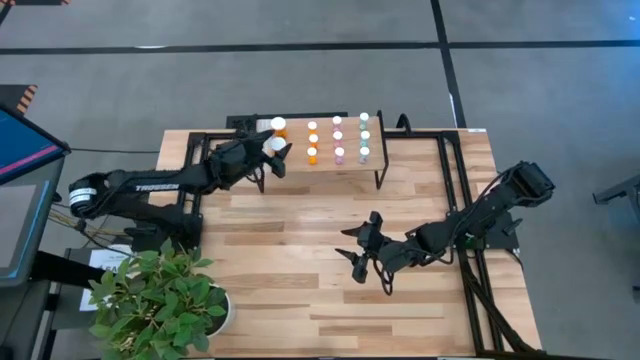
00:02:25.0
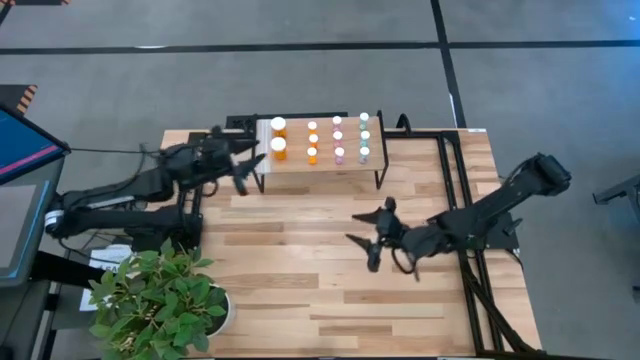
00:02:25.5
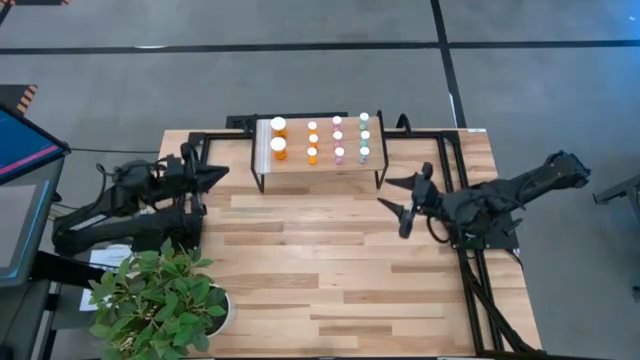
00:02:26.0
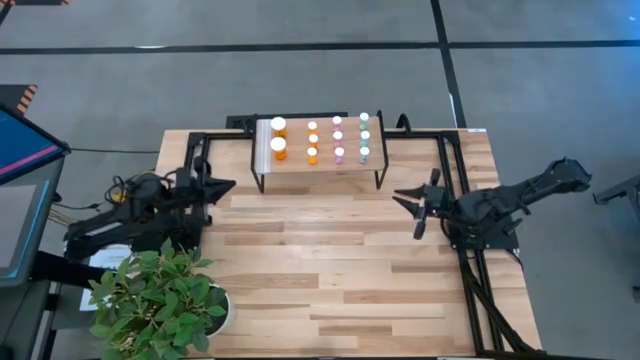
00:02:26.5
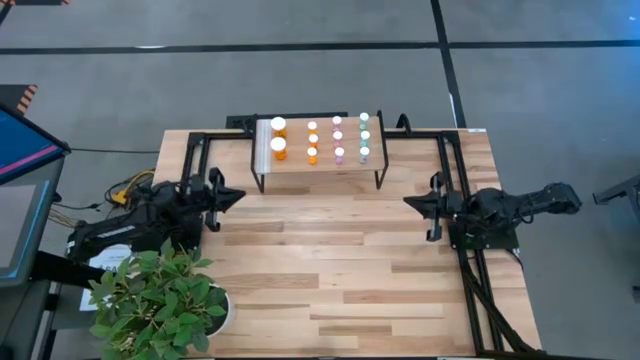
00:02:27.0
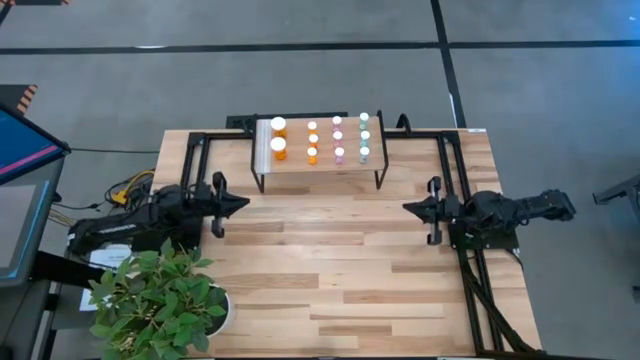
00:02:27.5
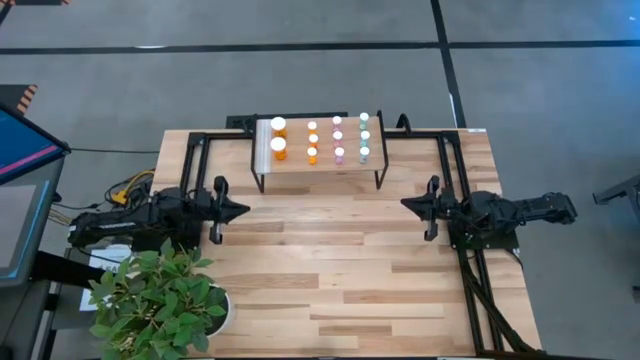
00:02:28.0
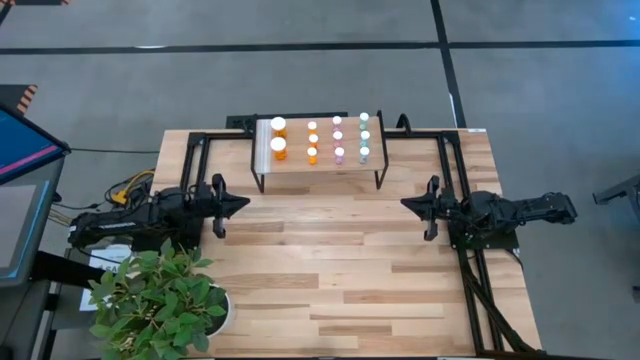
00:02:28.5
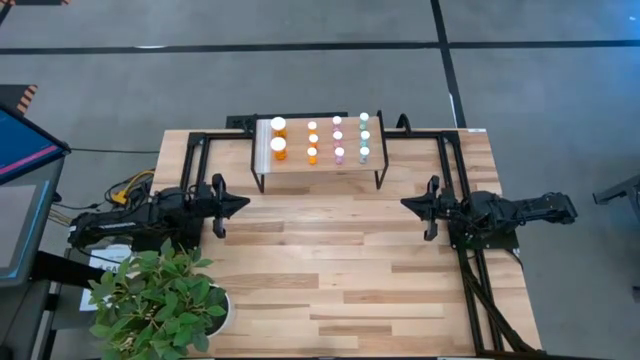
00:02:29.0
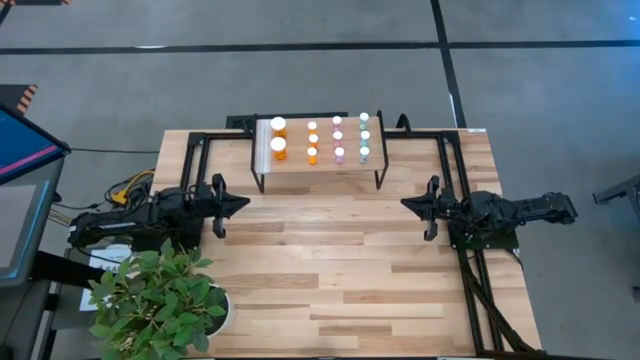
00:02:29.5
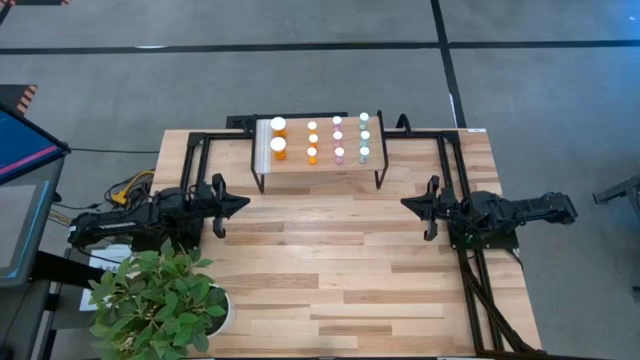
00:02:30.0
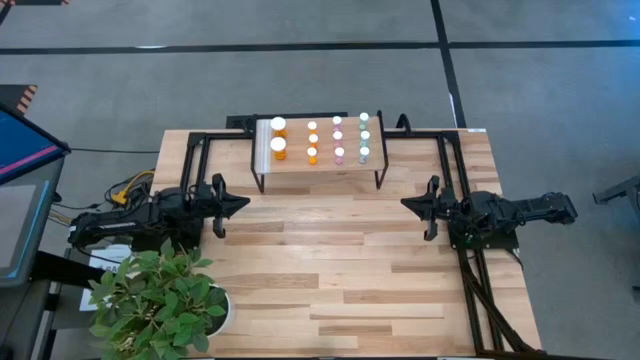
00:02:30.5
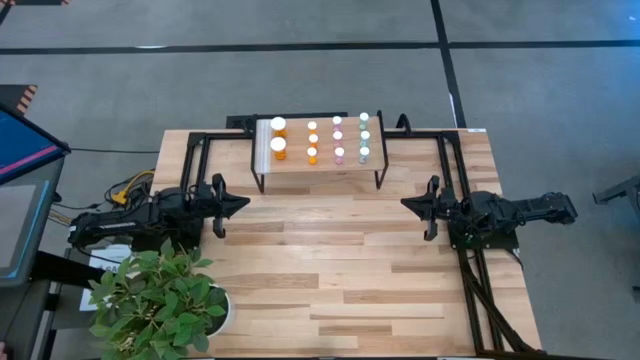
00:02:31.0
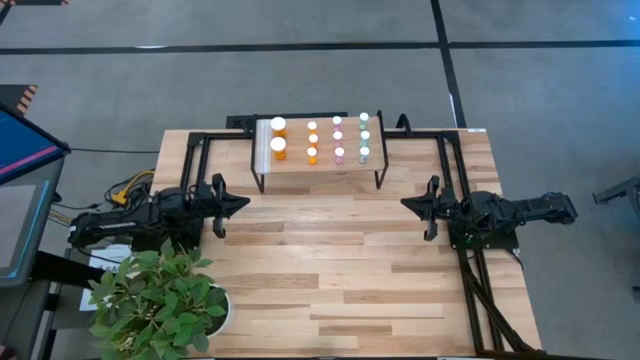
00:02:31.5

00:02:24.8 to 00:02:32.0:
Task: Pick and place medicine bottles onto shelf by color
Return to Home Position

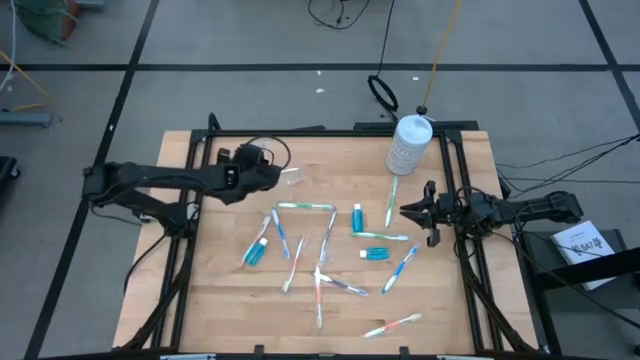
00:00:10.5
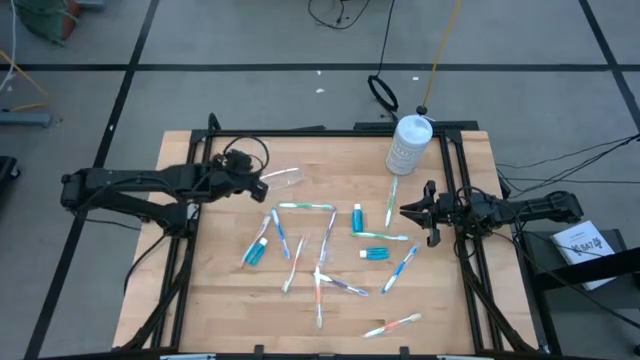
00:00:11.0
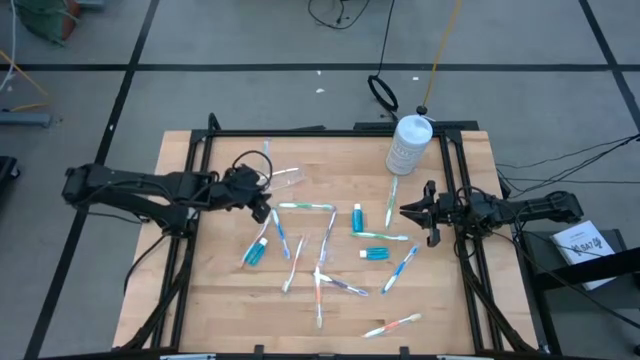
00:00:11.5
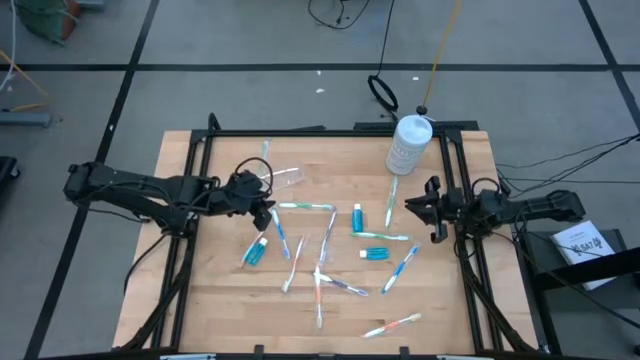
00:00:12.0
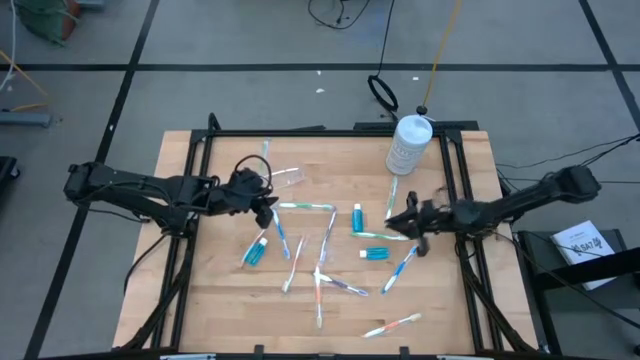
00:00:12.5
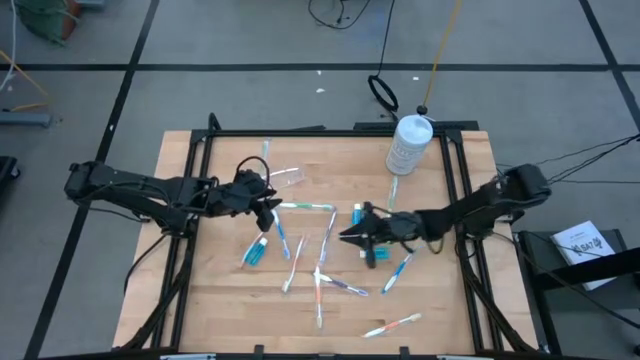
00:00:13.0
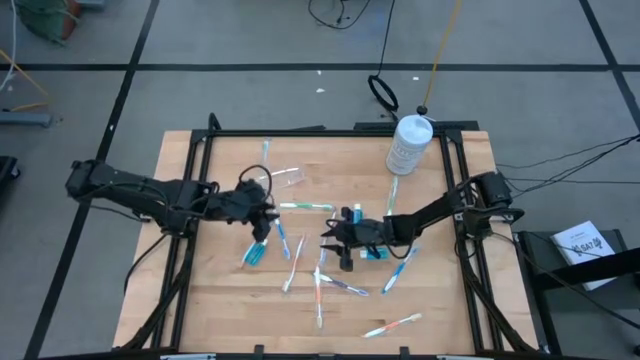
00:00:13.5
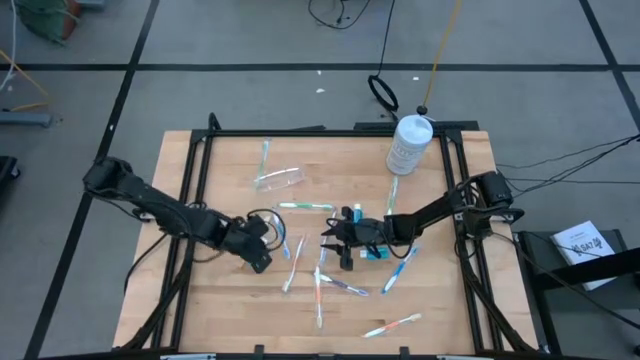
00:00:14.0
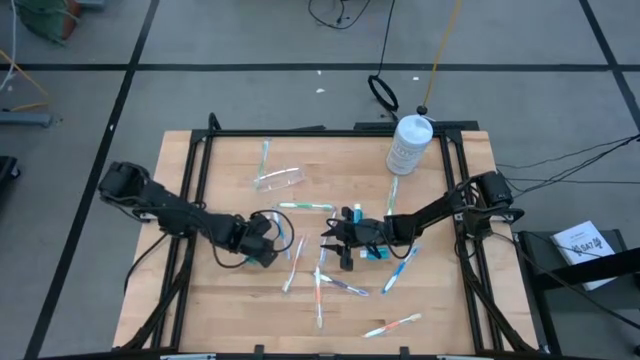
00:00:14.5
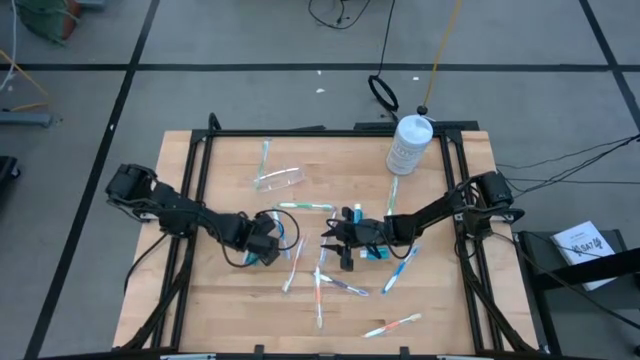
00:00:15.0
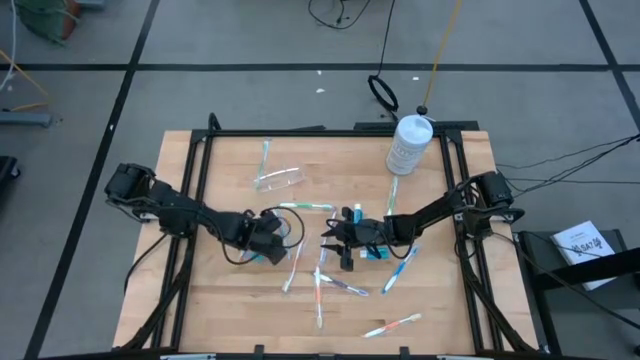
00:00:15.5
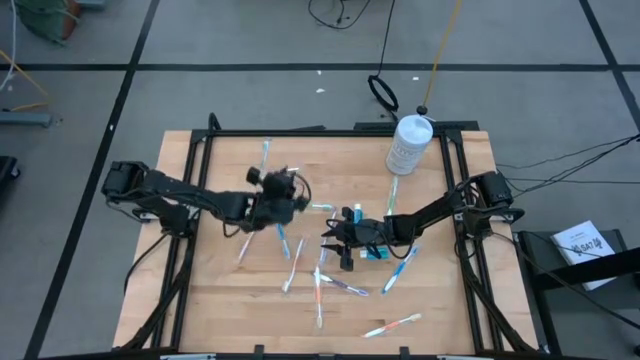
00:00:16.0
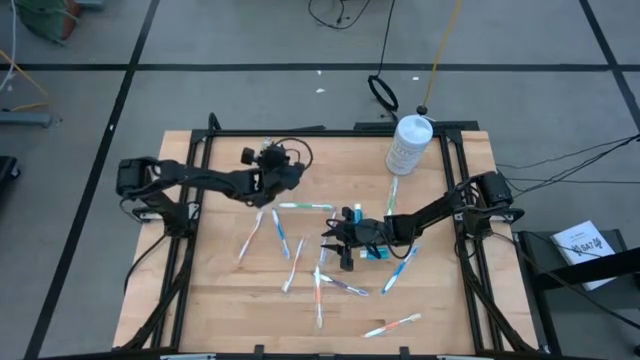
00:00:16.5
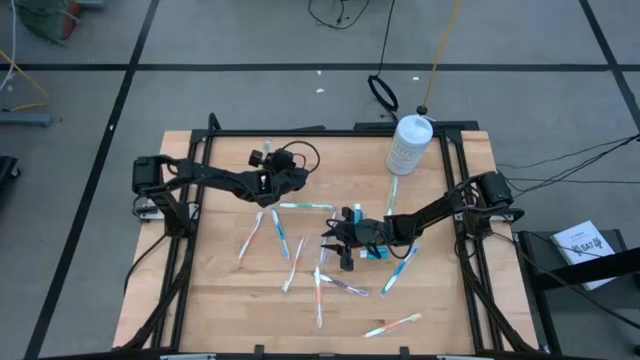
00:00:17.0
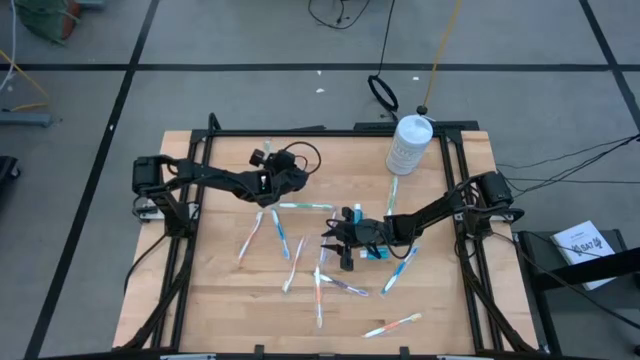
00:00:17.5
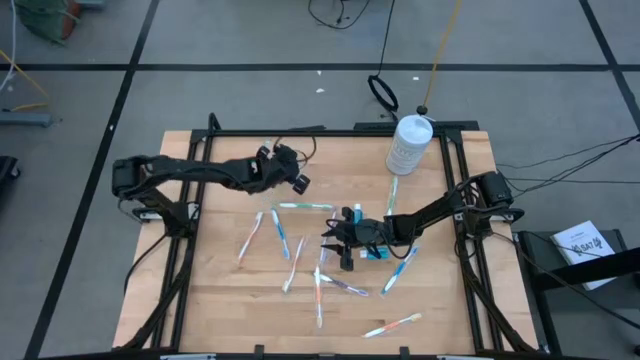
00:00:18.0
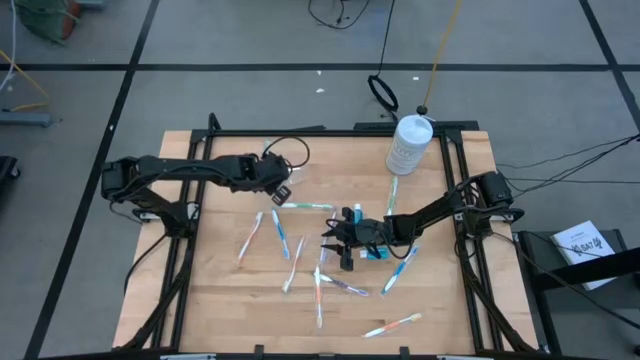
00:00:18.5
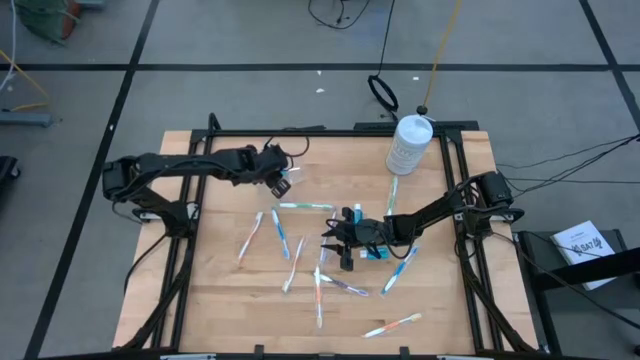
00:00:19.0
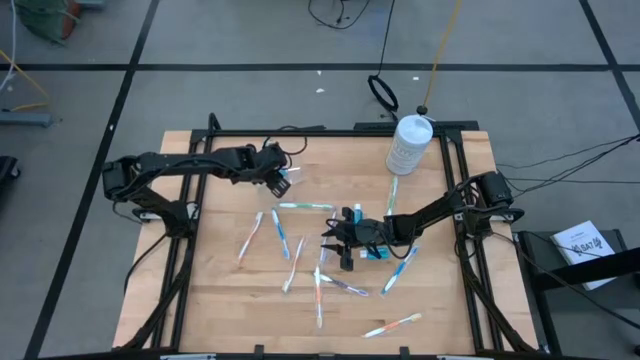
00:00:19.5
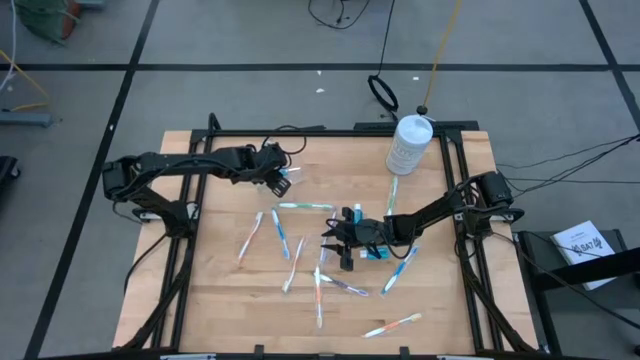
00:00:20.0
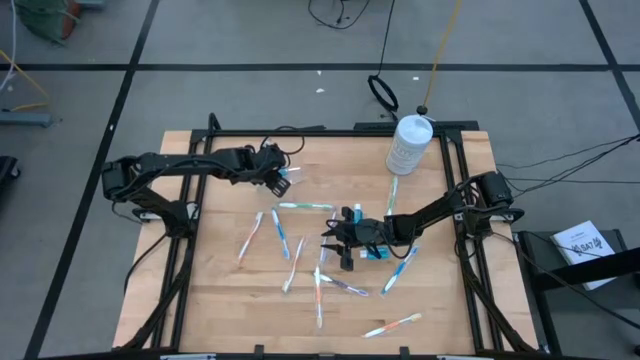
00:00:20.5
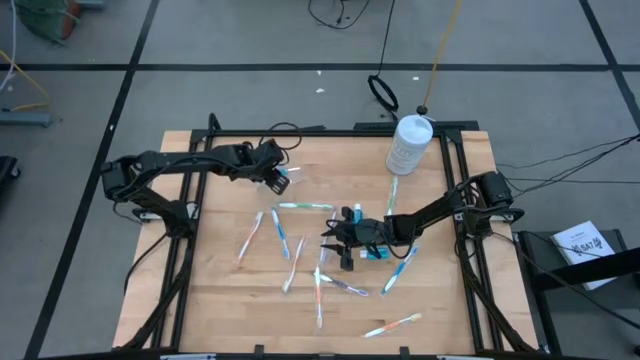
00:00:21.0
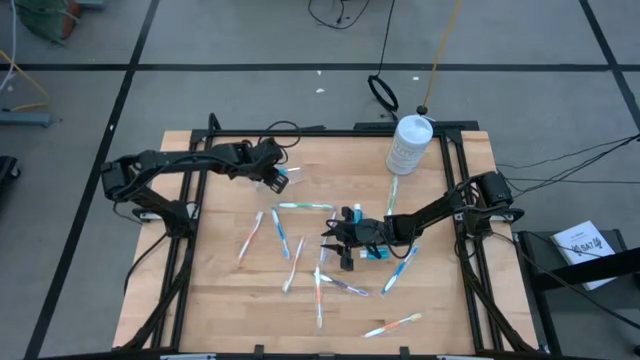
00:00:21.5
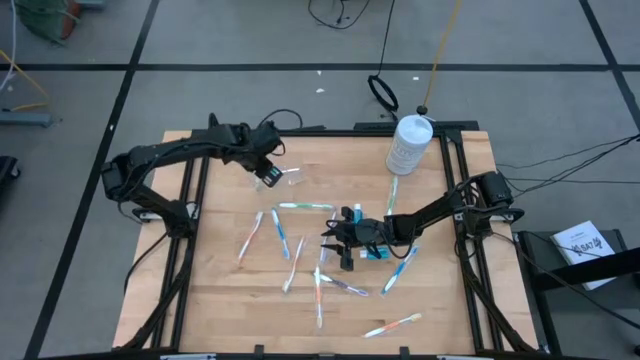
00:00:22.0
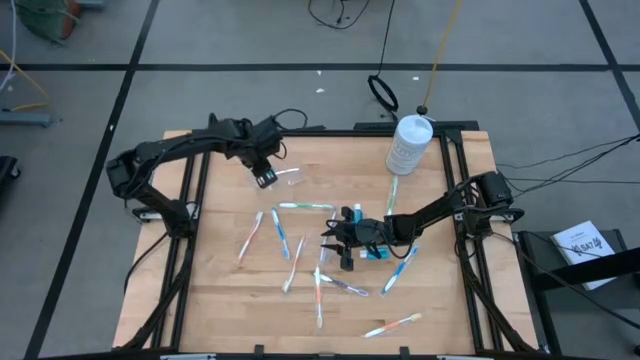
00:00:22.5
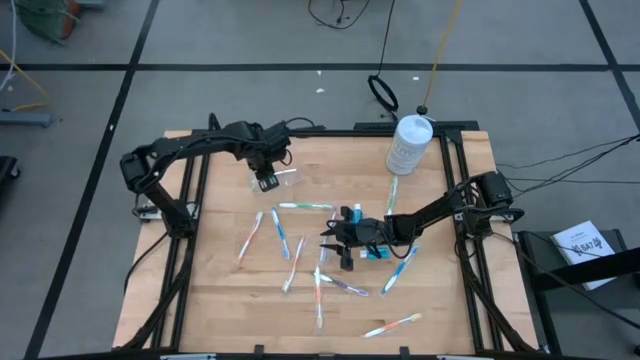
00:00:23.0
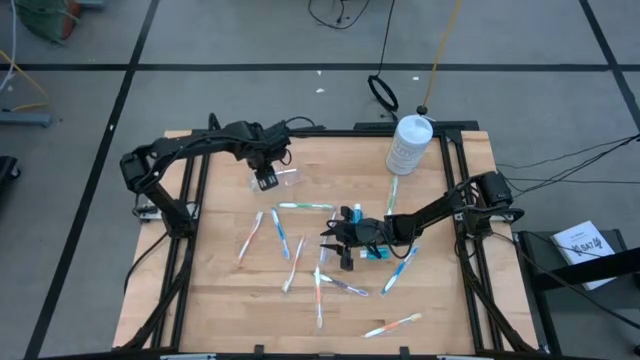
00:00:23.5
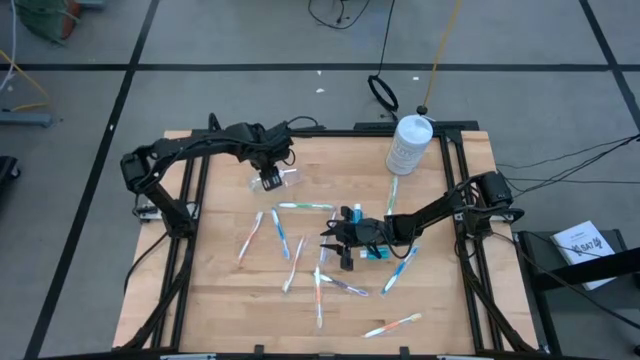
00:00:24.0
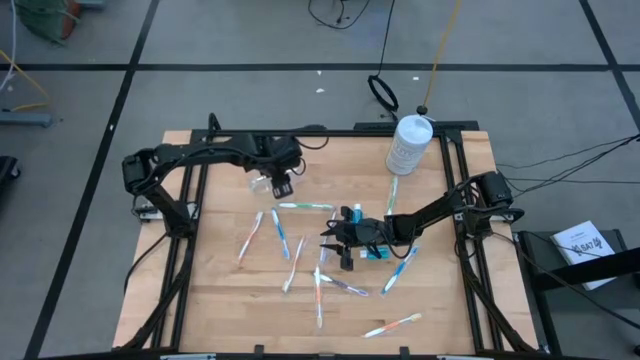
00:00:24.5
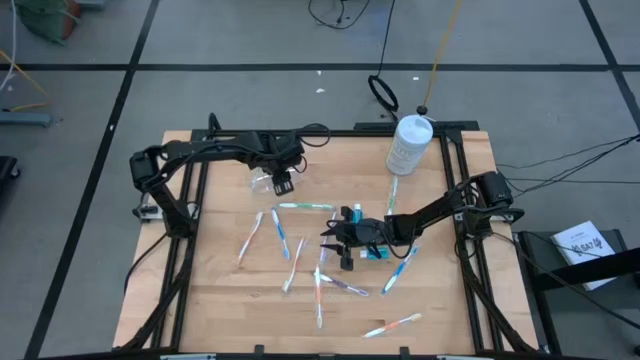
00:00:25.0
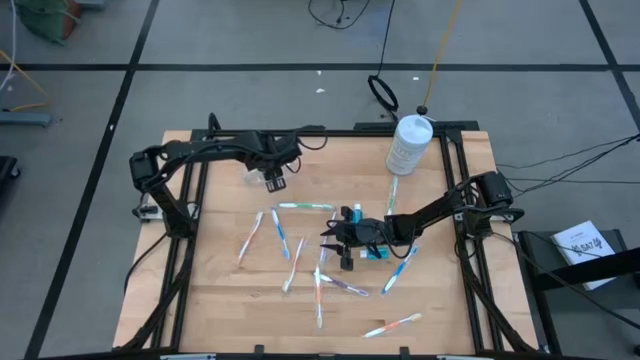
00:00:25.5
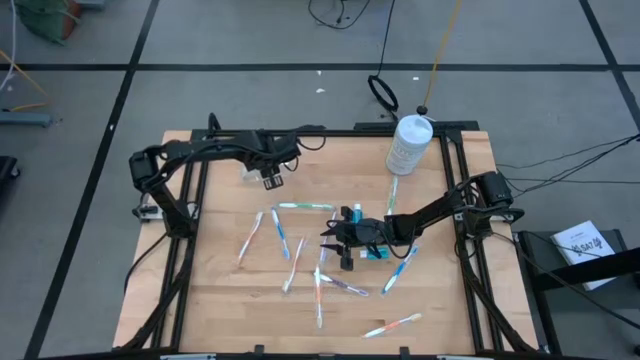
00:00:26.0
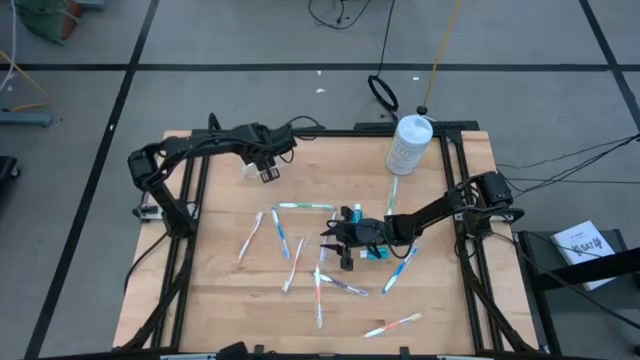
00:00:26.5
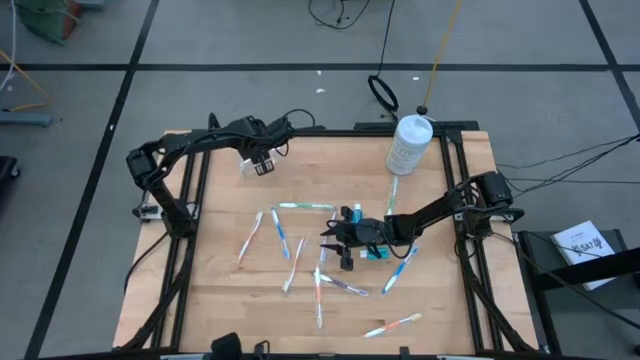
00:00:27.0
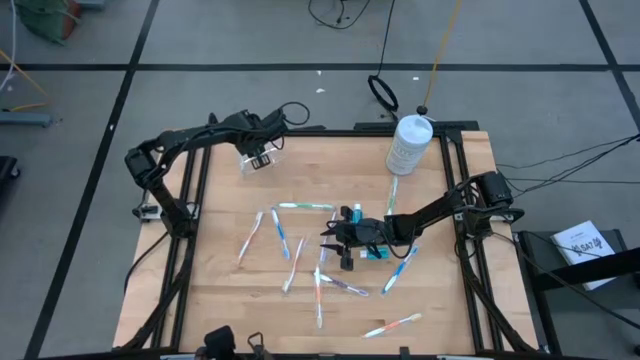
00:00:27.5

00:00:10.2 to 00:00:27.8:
Task: Pick & Place toothbrushing station
Put the mouthwash into the transparent organizer
